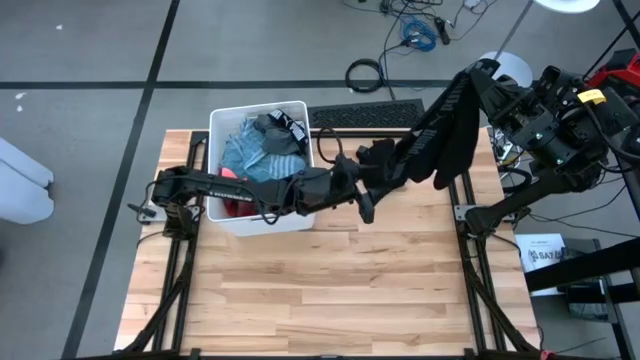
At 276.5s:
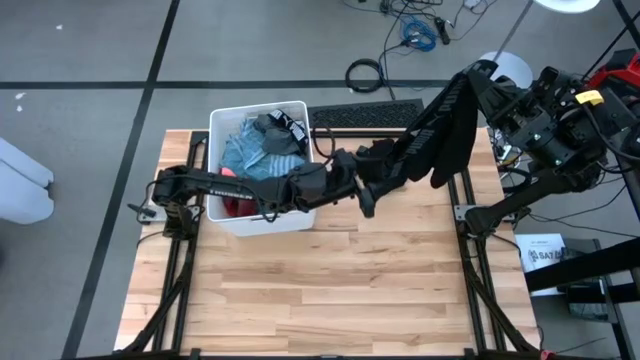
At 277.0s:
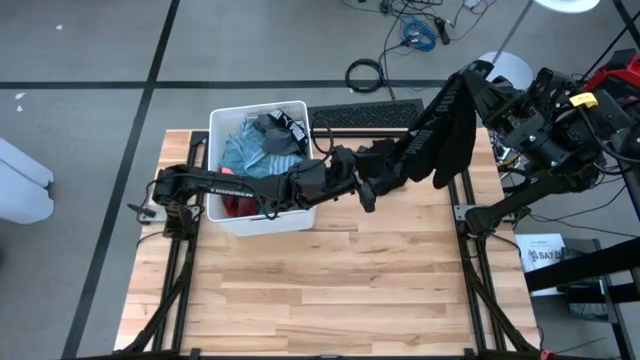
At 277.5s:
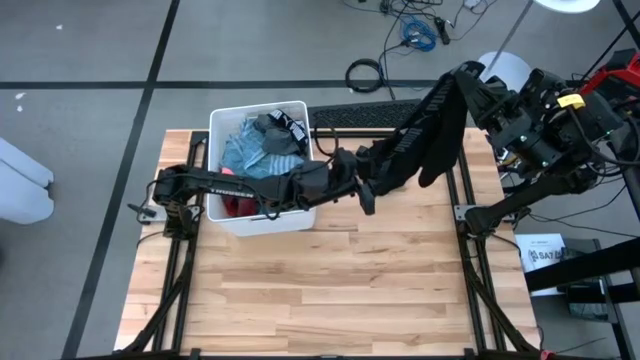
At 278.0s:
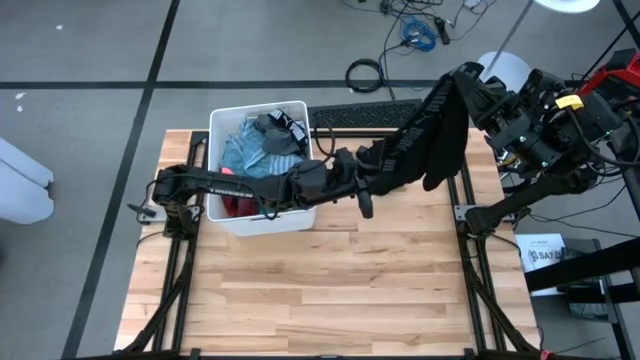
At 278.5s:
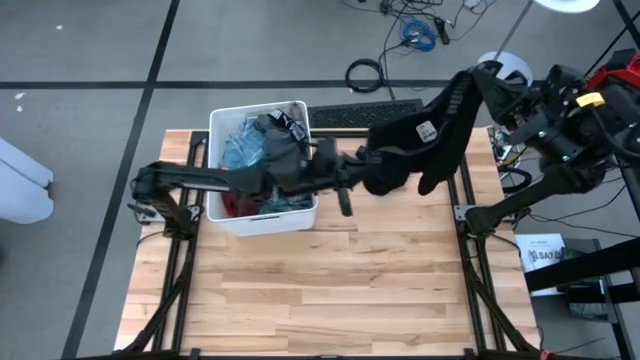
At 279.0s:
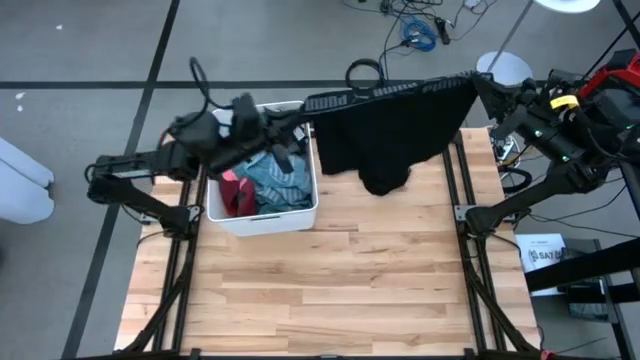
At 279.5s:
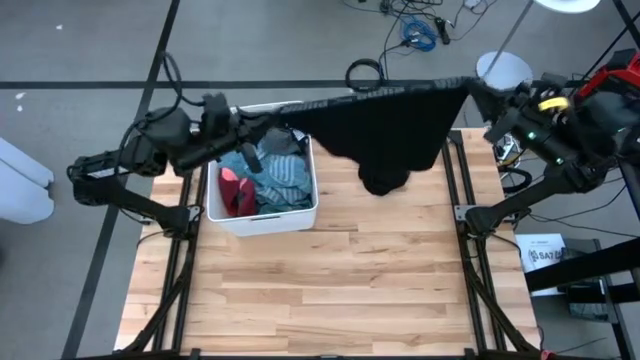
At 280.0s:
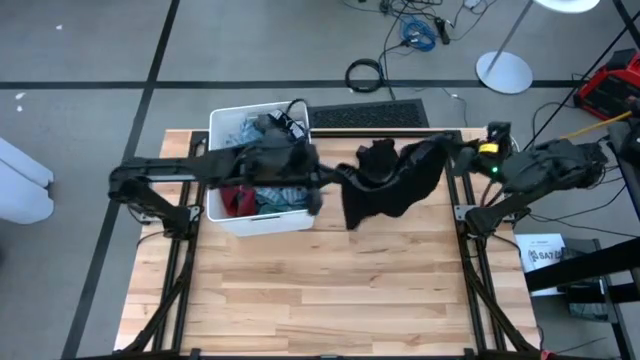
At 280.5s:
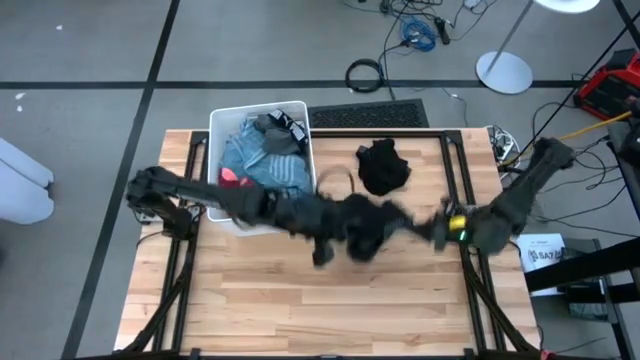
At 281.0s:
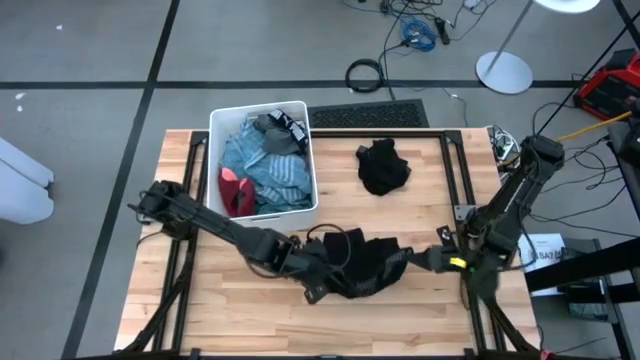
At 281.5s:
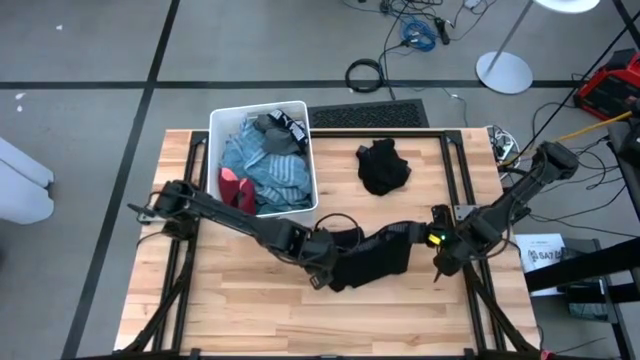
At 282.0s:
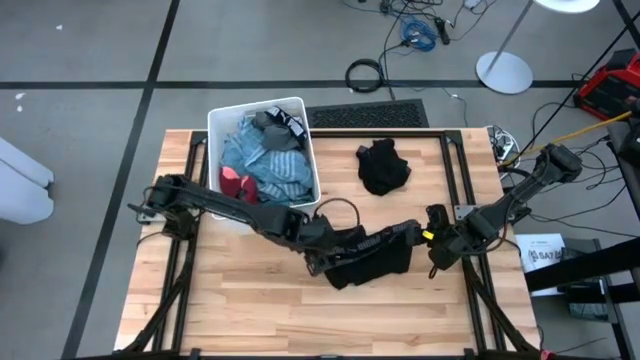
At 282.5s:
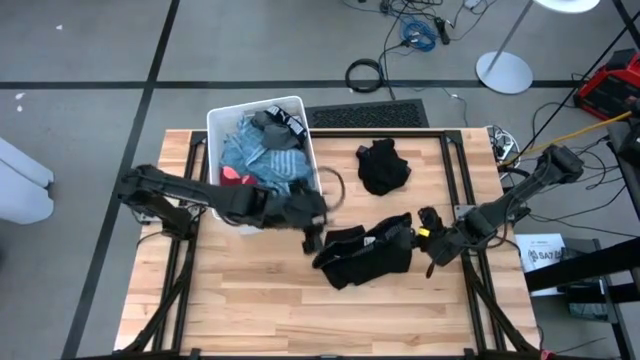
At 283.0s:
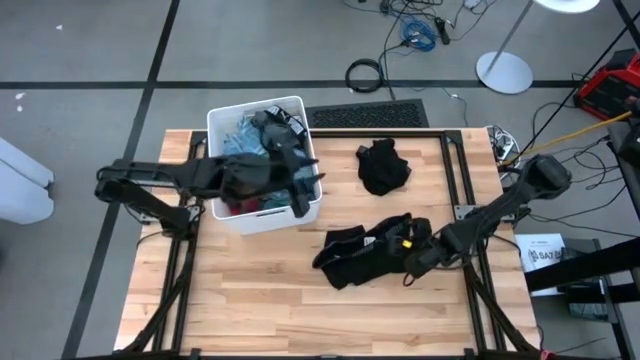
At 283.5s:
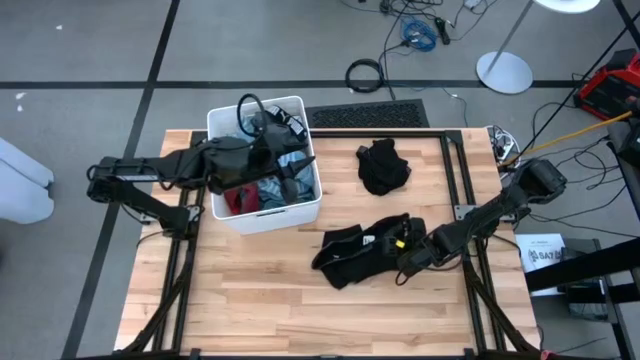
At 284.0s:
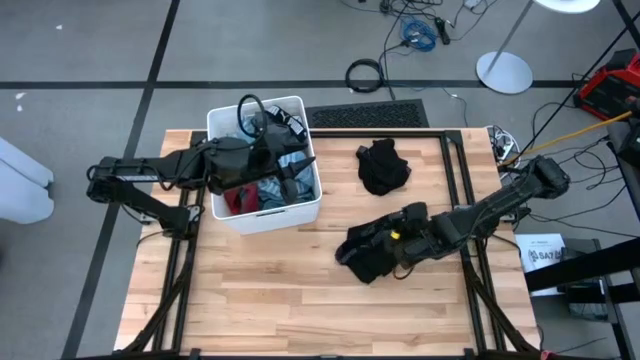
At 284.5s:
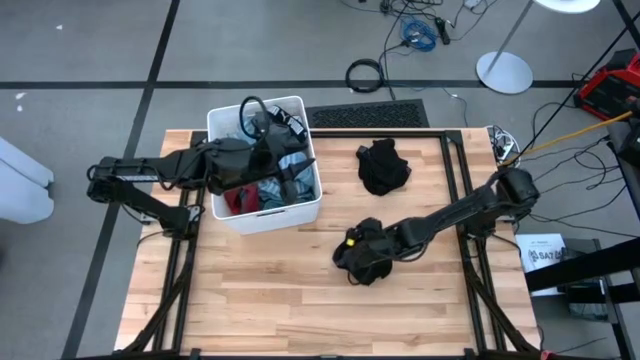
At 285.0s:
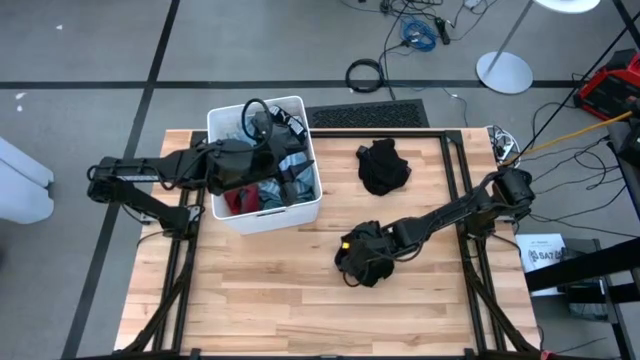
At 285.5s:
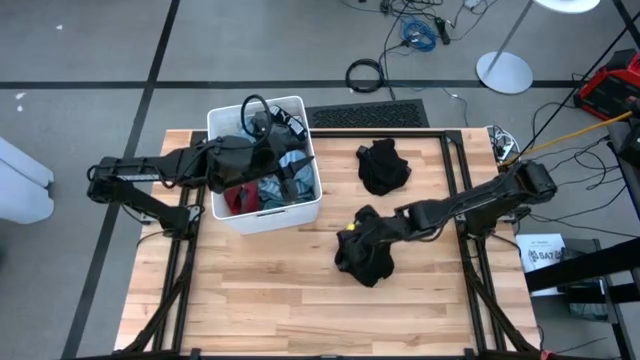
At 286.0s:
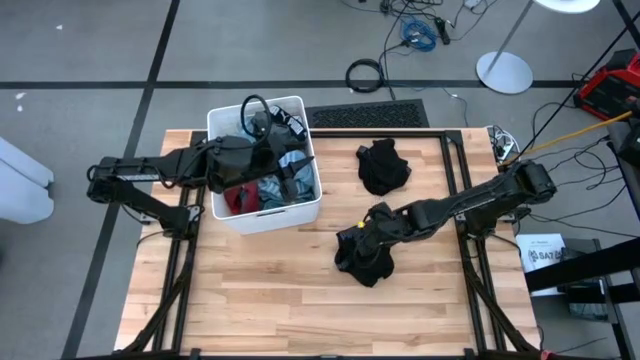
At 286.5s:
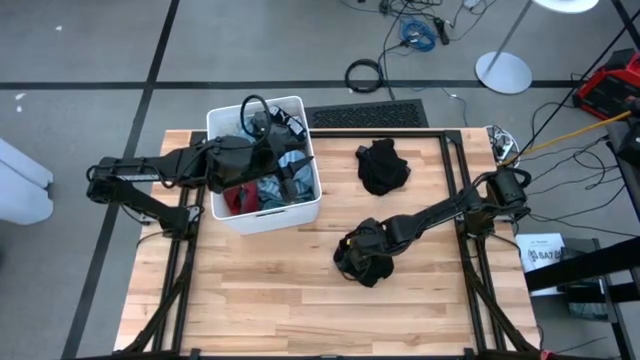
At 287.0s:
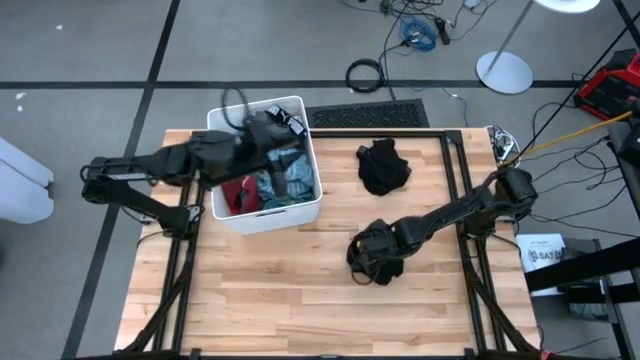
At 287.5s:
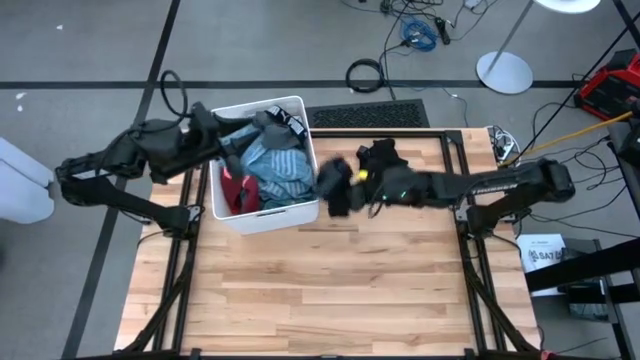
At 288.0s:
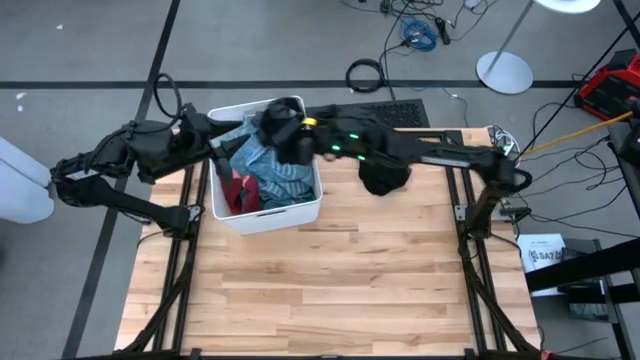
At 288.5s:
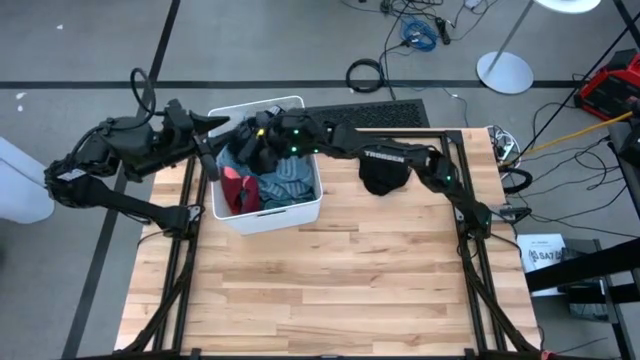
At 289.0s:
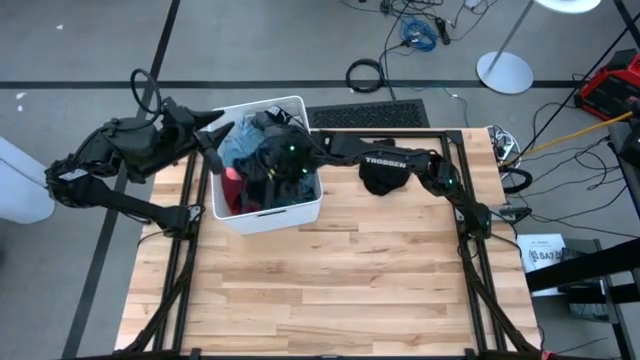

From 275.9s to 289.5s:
Task: Sort clothes
Put the bottom black shorts into the white laundry organizer

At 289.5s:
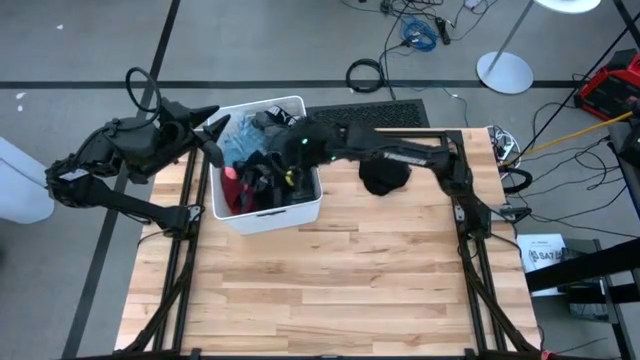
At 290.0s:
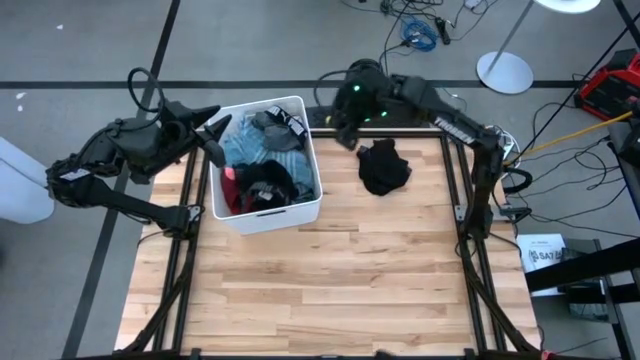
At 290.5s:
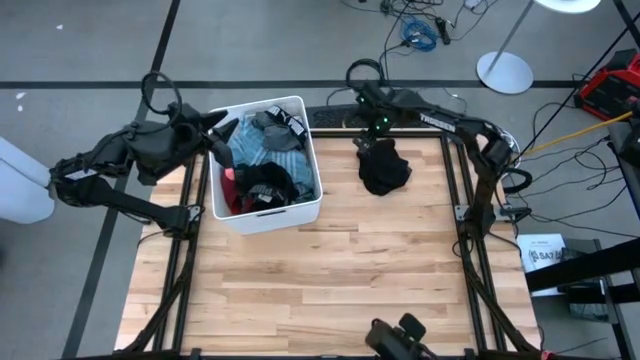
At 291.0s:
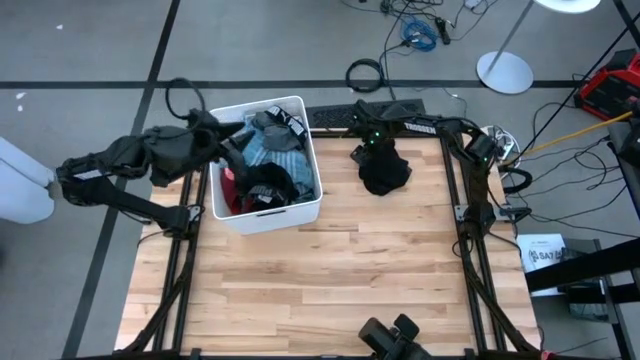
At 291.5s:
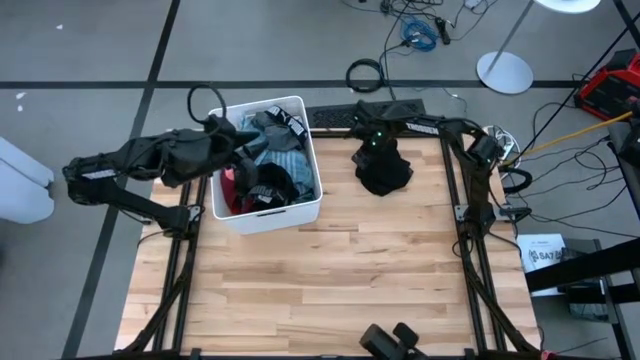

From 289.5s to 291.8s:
Put the black shorts into the white laundry organizer

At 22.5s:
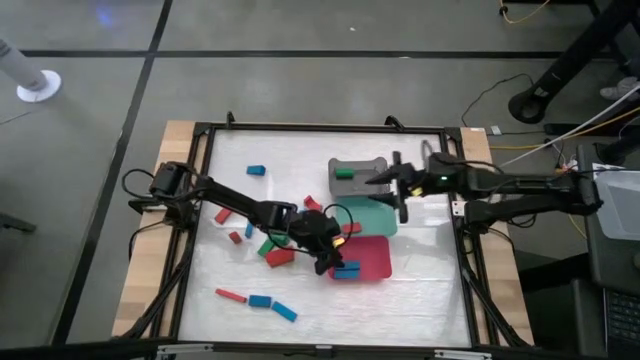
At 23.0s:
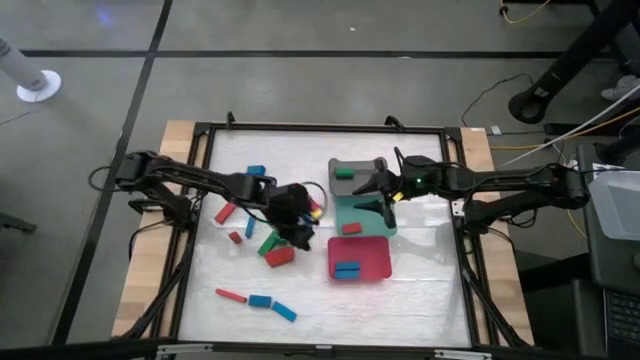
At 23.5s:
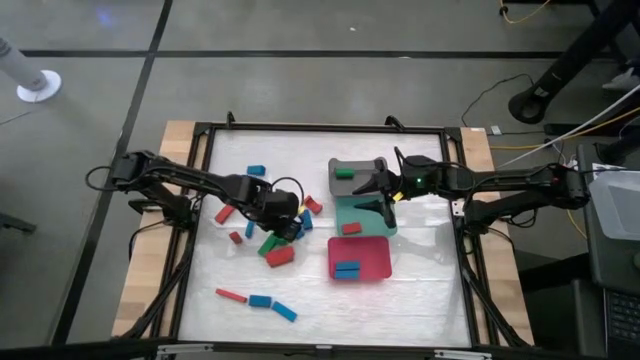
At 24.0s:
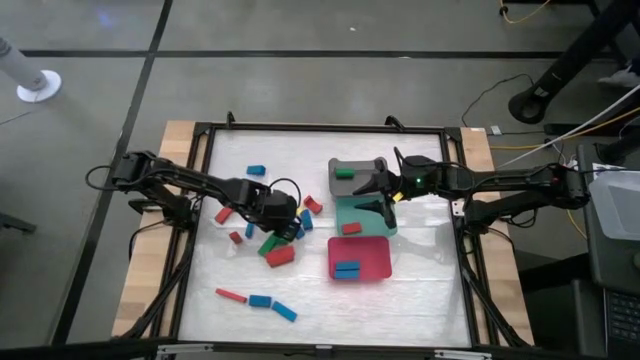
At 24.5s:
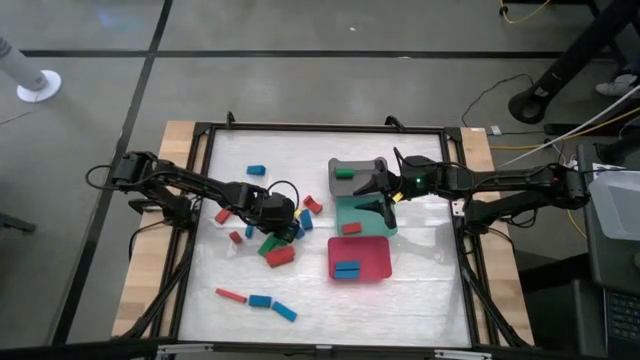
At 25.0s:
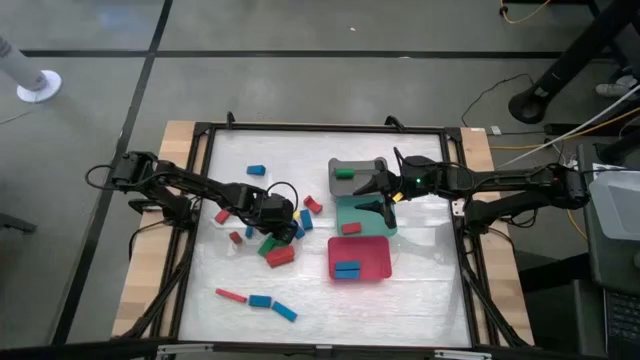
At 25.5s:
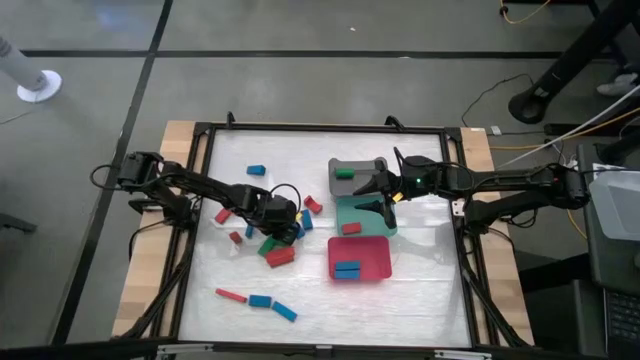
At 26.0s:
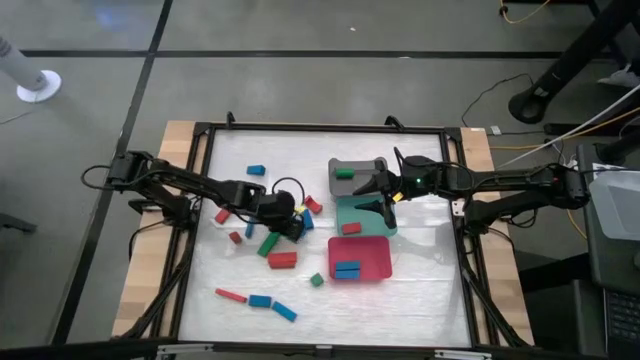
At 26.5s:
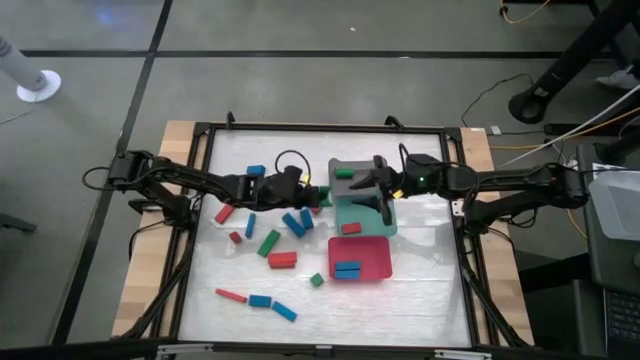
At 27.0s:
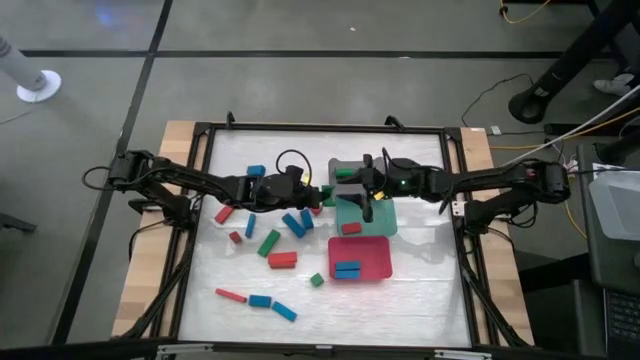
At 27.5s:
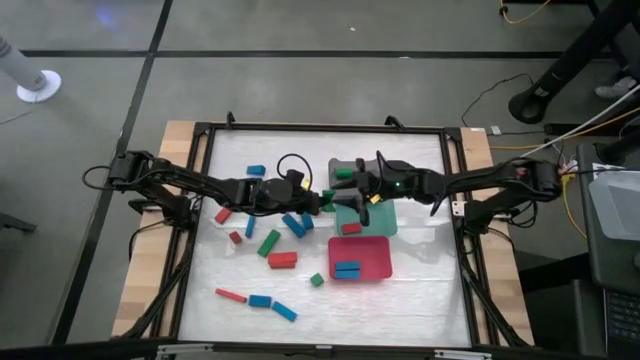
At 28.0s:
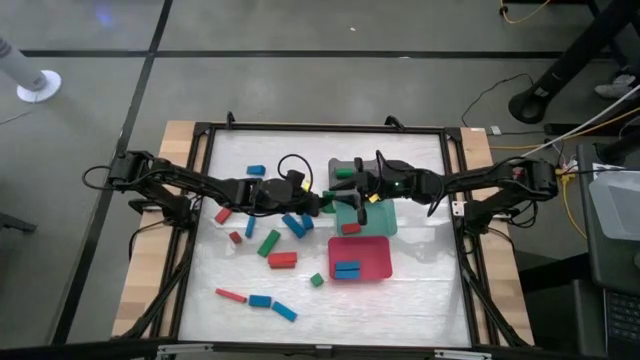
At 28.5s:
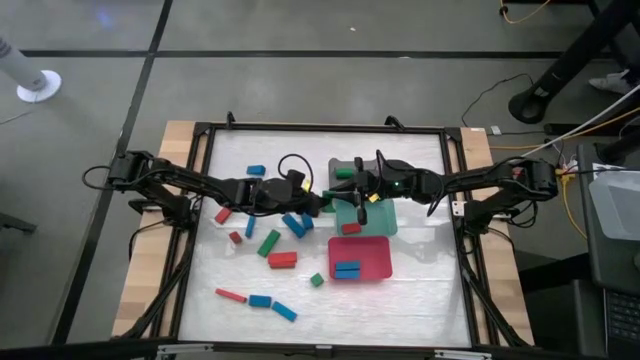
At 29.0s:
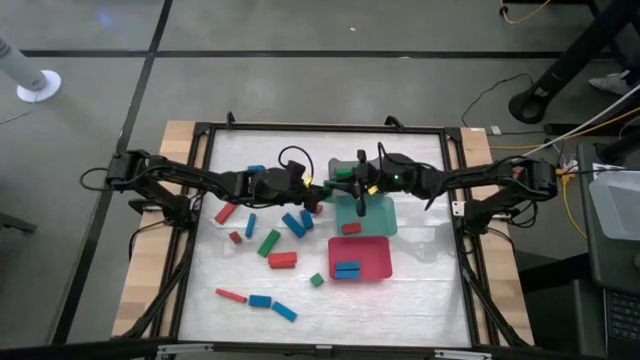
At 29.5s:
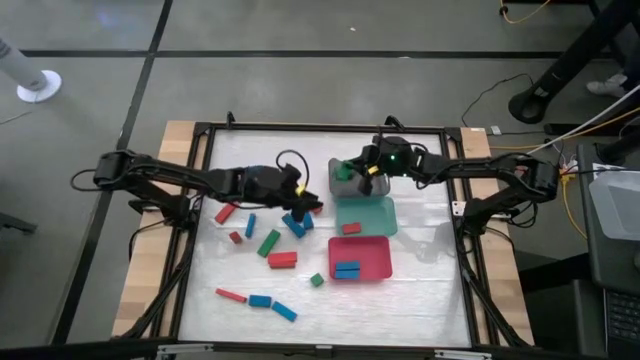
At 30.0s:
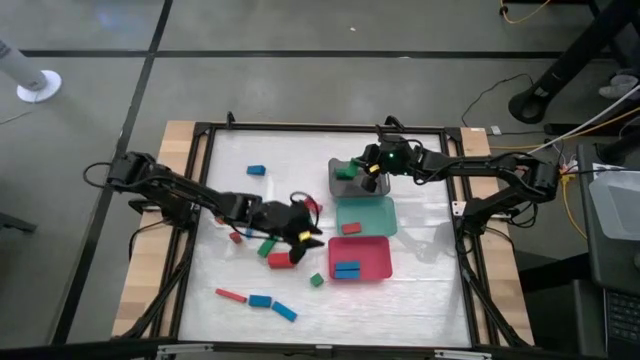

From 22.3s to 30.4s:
Task: Sort blocks
Put the green block into the black bin
